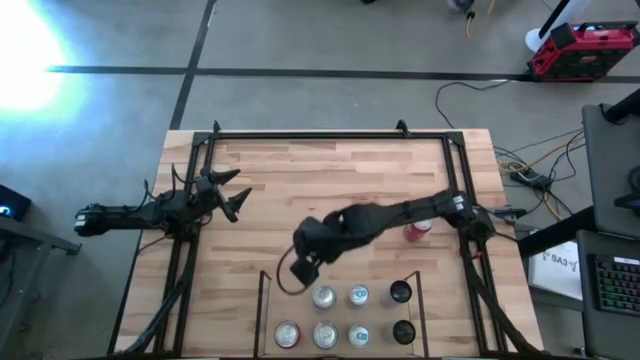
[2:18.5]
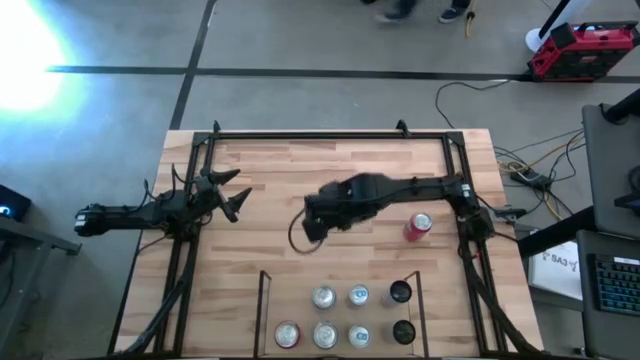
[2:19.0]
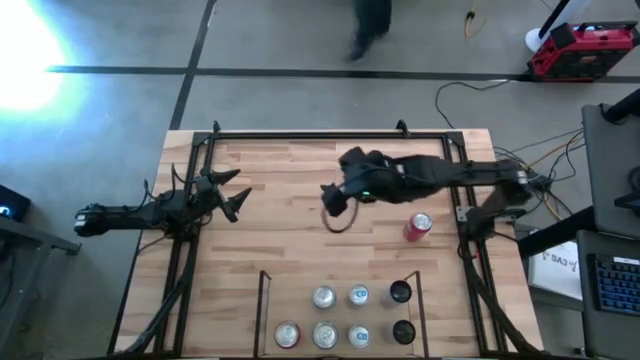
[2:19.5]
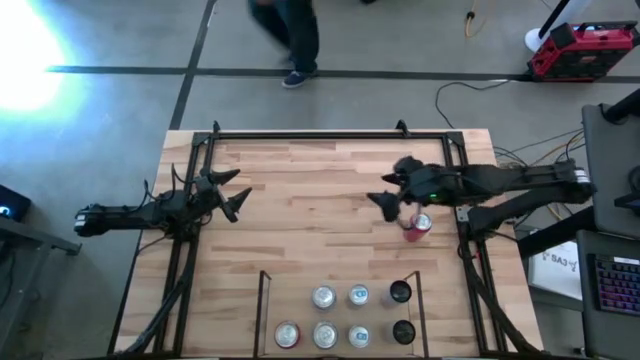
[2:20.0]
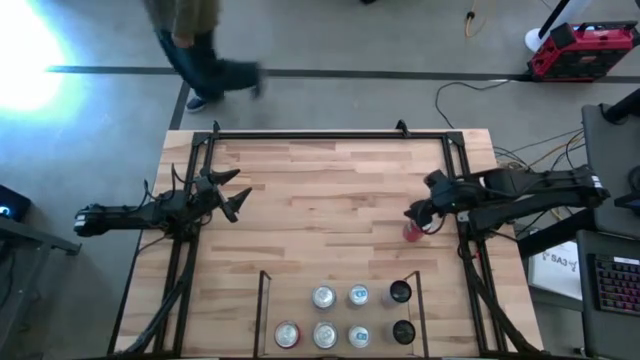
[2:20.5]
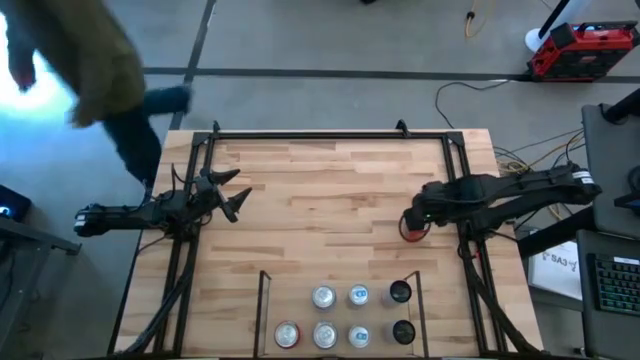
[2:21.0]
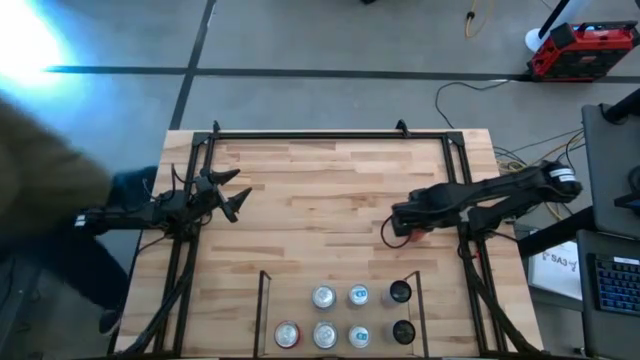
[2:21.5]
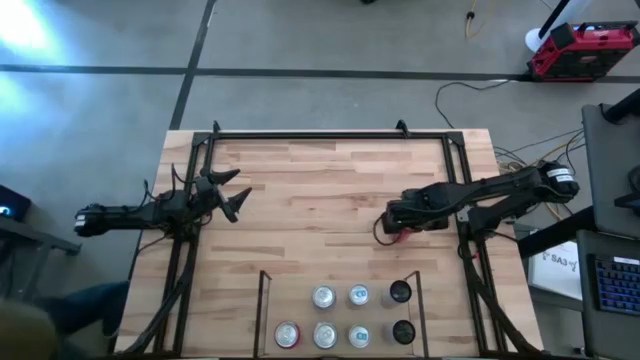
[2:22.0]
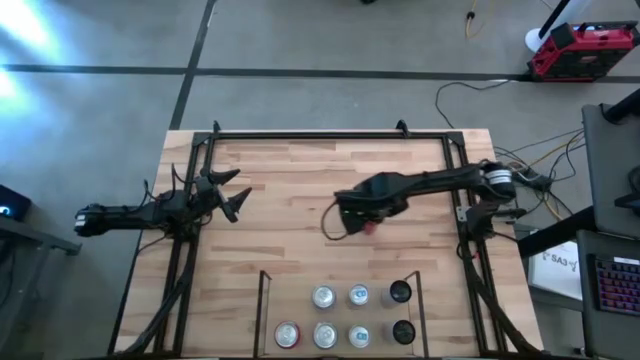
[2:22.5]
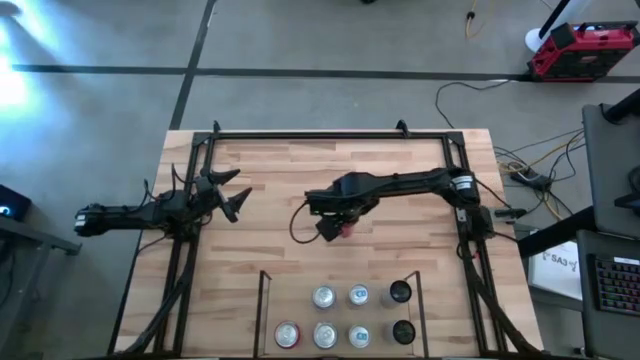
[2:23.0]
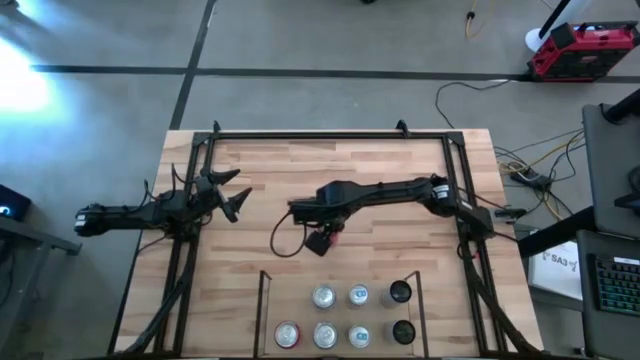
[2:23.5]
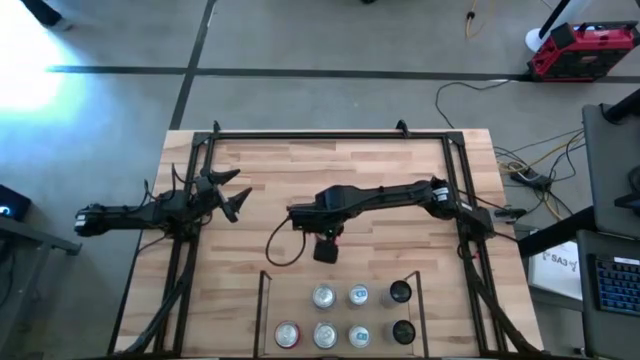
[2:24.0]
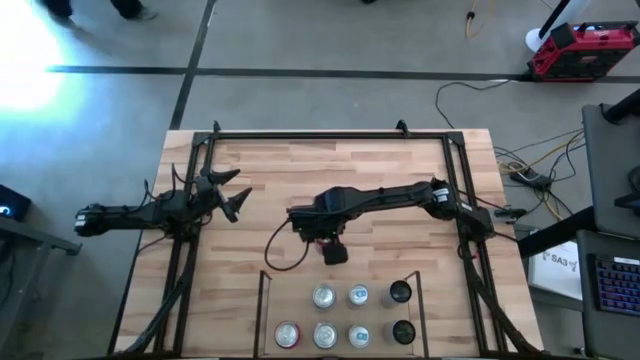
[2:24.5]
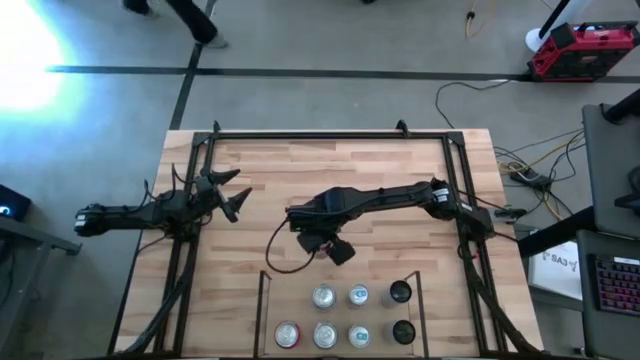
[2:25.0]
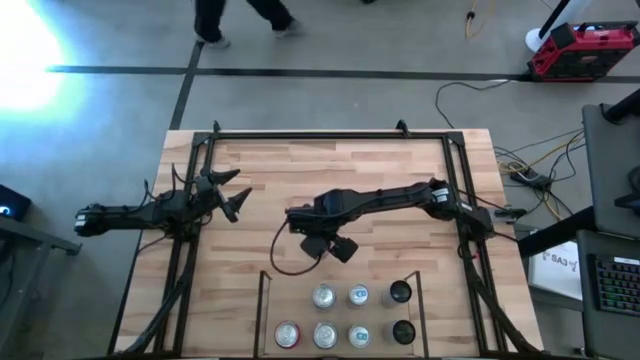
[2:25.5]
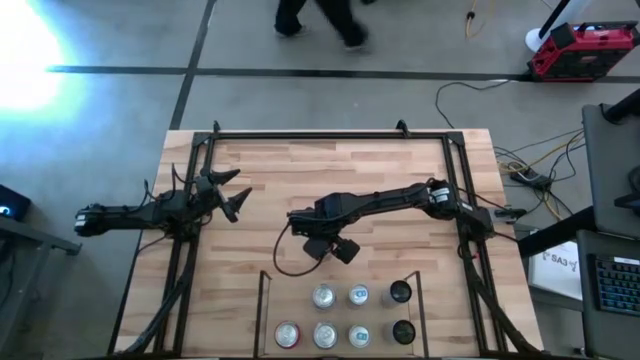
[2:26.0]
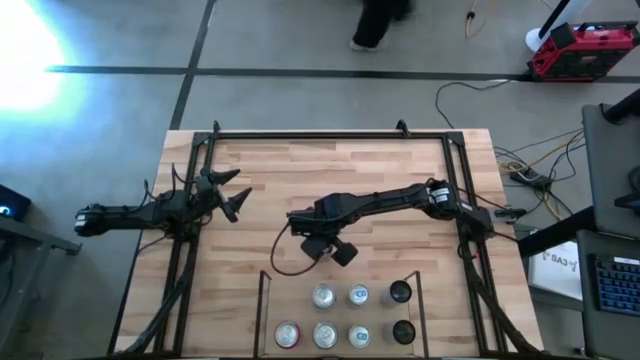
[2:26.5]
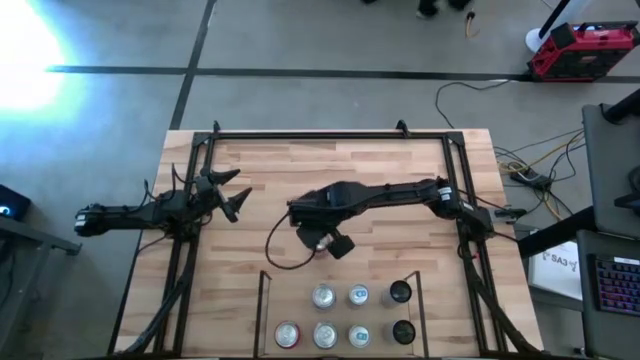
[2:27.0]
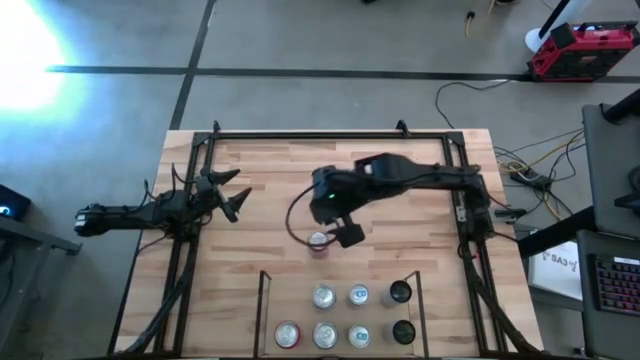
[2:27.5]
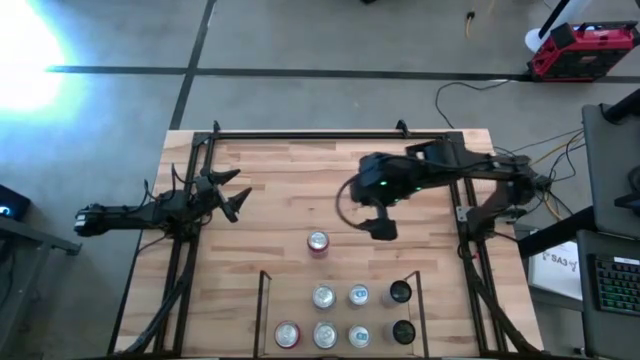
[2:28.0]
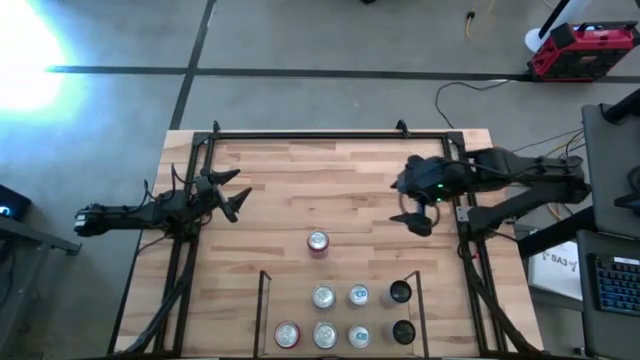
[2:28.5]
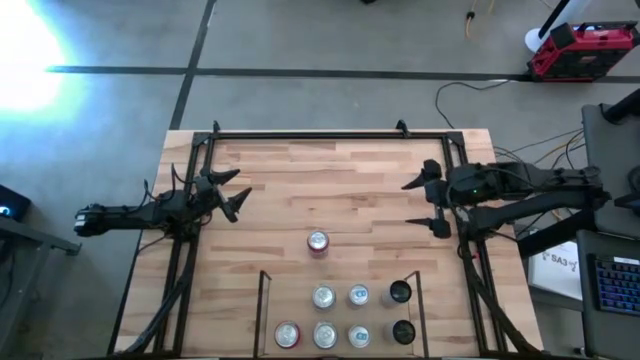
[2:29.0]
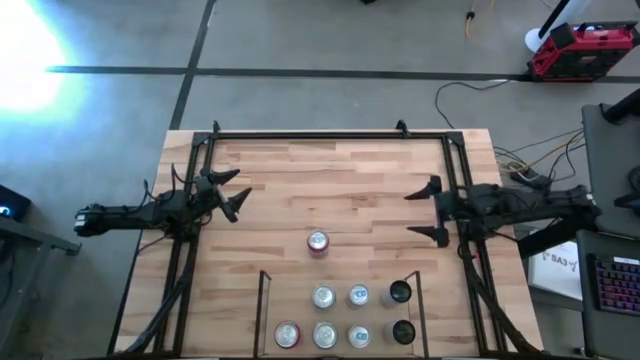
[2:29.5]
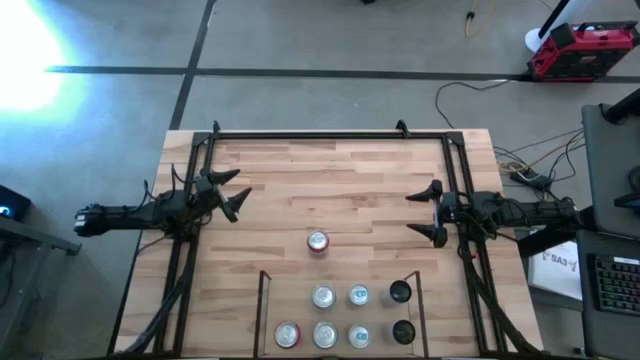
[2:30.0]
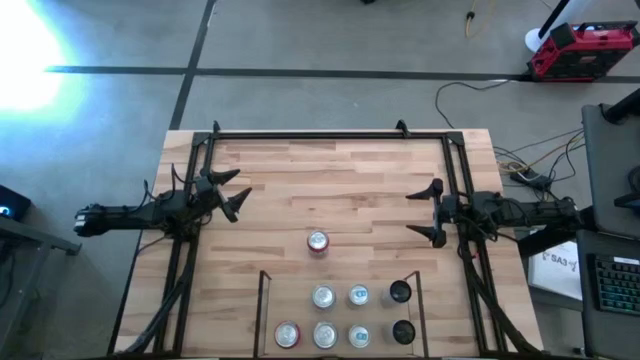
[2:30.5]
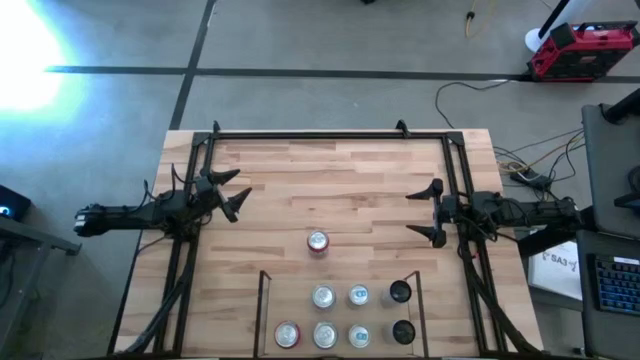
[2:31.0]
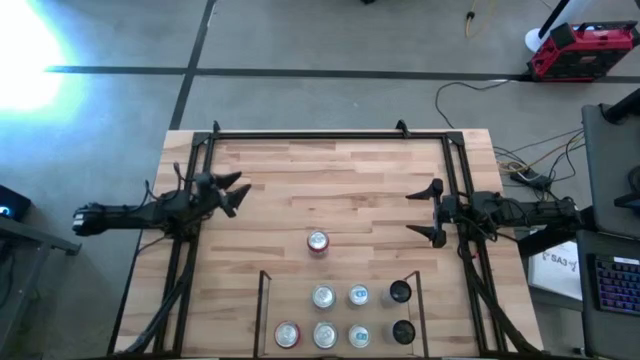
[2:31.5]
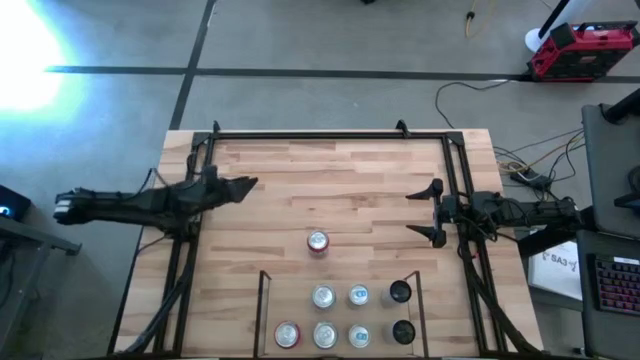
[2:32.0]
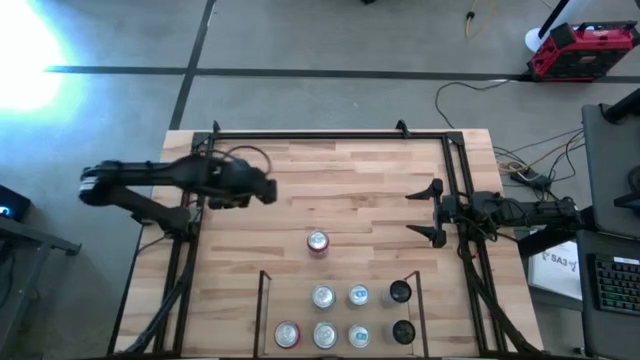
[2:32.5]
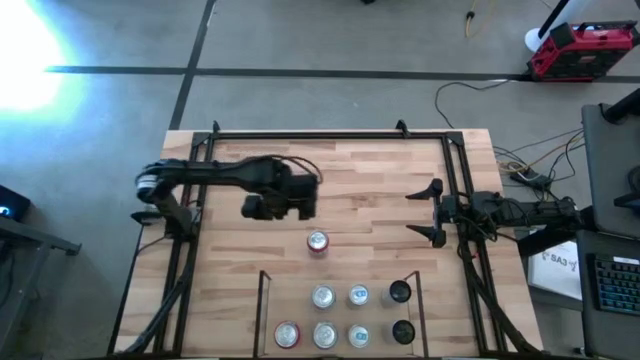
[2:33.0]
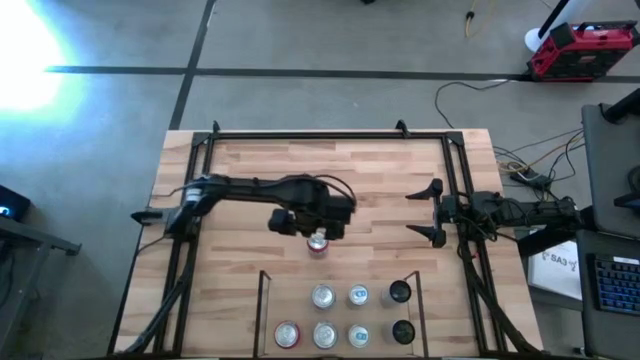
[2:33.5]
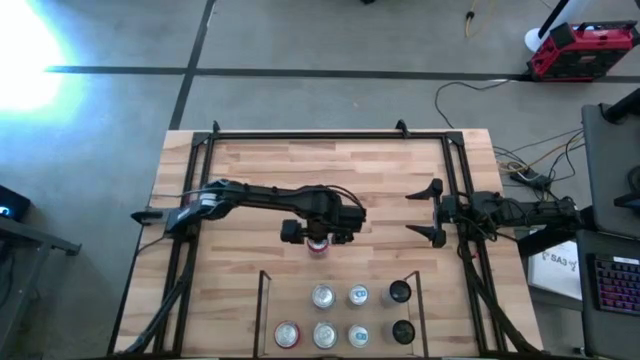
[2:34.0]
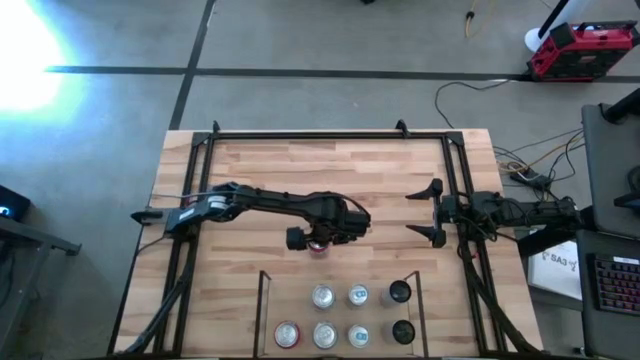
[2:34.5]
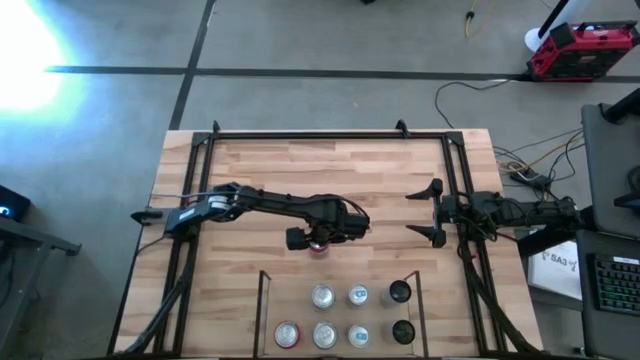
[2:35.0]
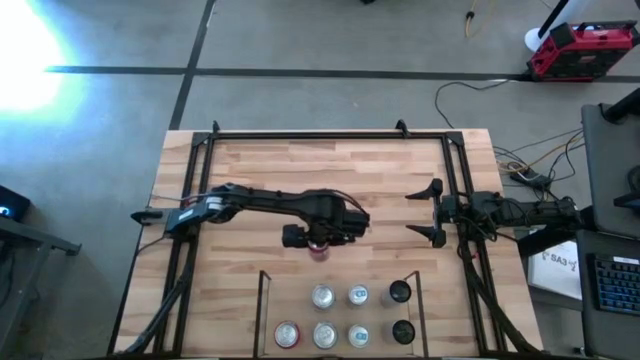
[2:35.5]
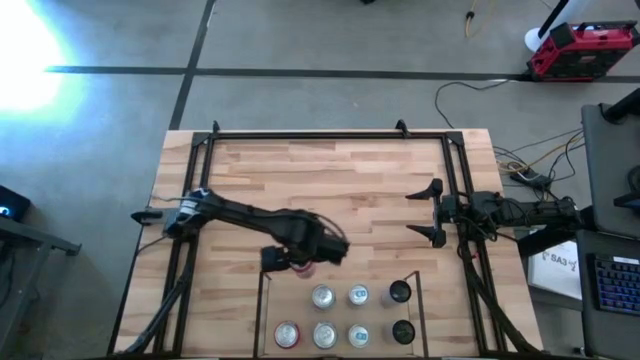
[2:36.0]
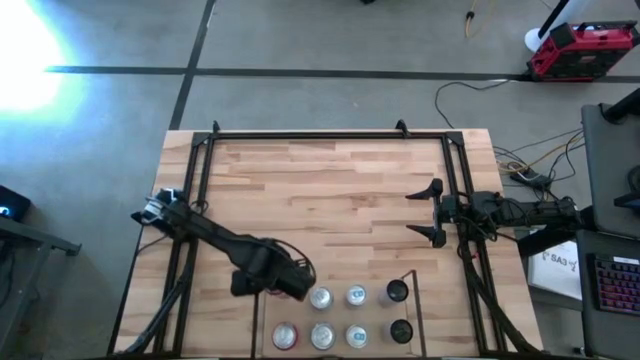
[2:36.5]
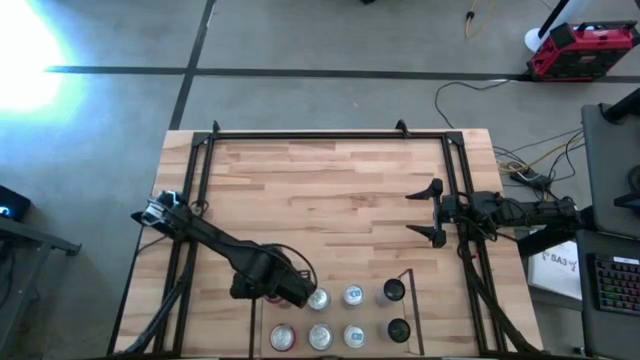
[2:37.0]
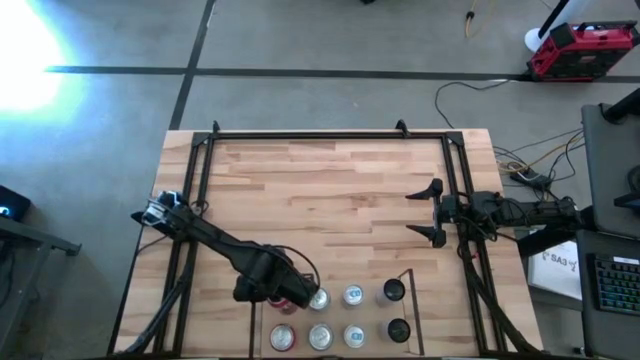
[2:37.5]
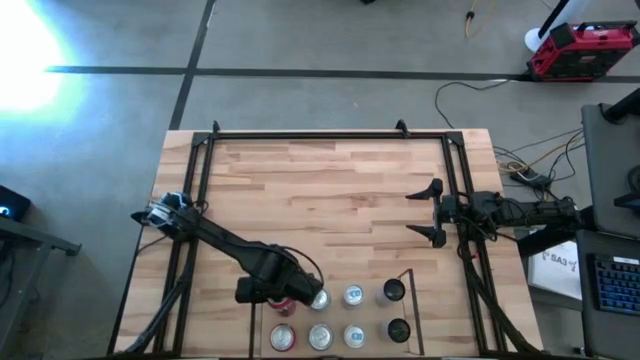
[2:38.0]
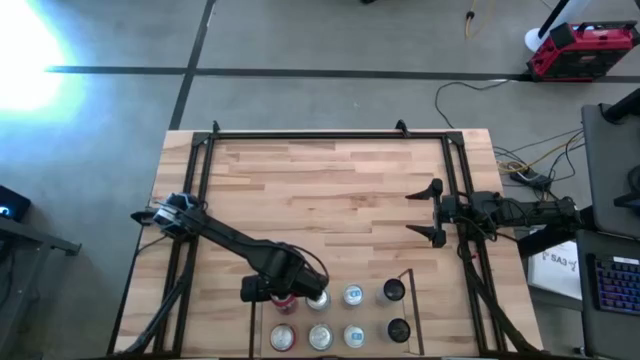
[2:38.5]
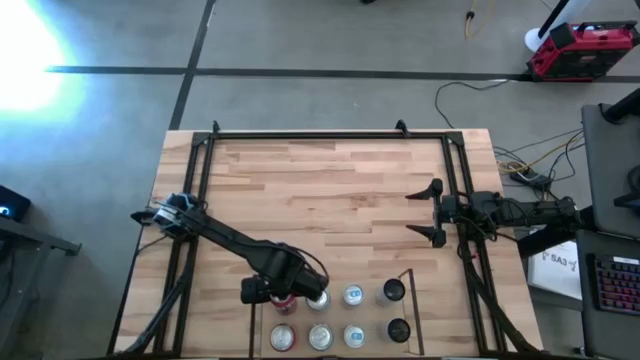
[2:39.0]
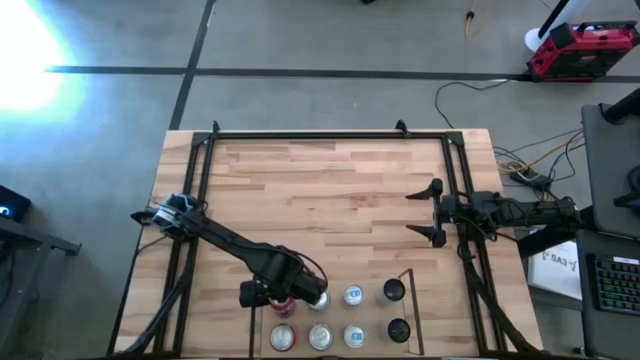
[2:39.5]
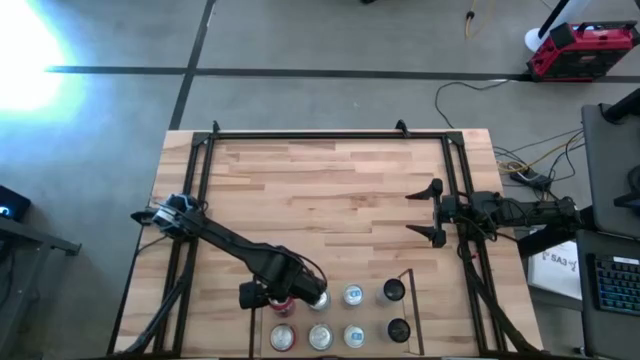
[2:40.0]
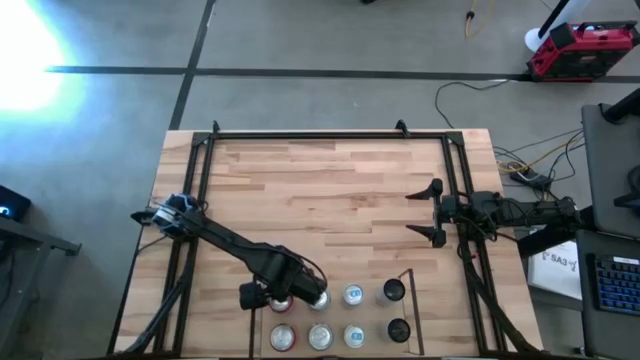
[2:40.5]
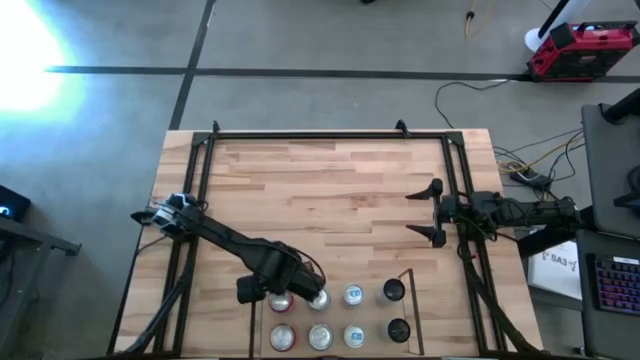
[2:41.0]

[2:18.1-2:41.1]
Task: Place canned beverage on shelf
Put the red soda can on the shelf aligned with the other red soda can
